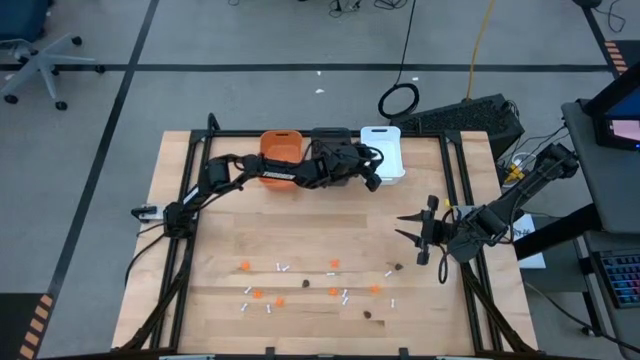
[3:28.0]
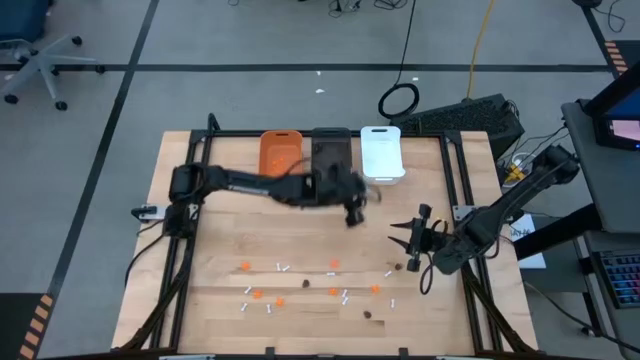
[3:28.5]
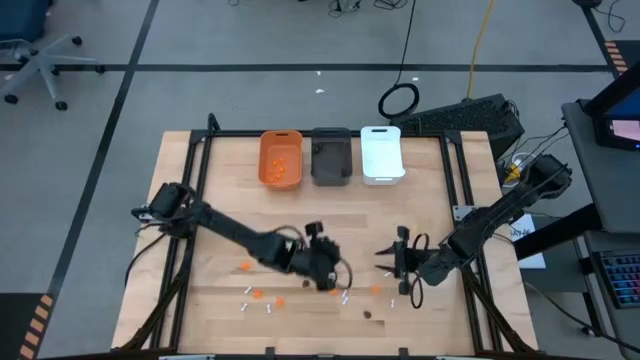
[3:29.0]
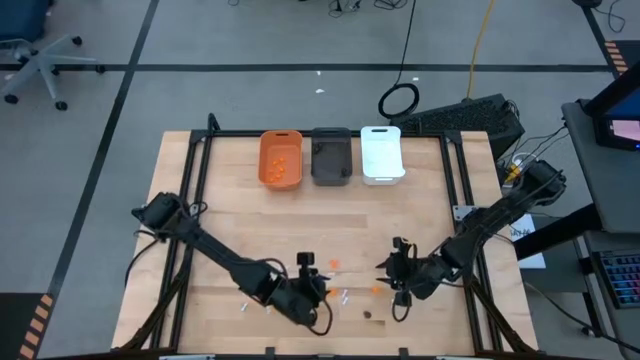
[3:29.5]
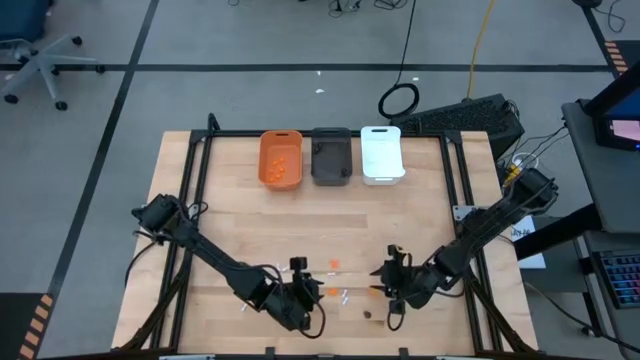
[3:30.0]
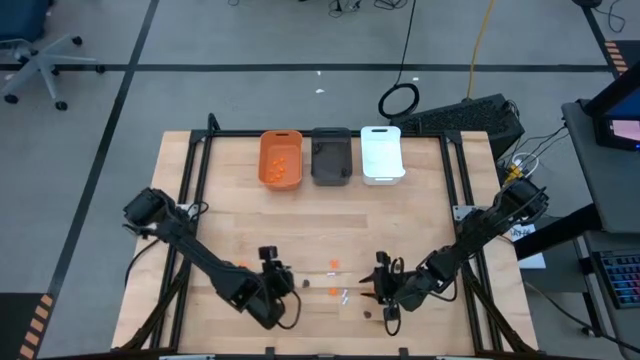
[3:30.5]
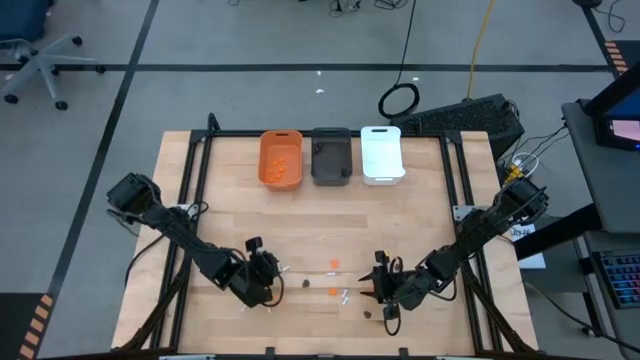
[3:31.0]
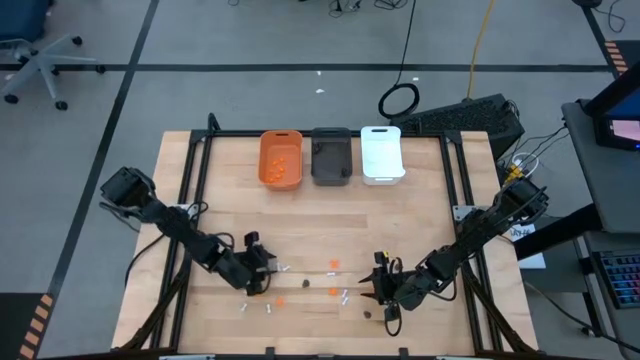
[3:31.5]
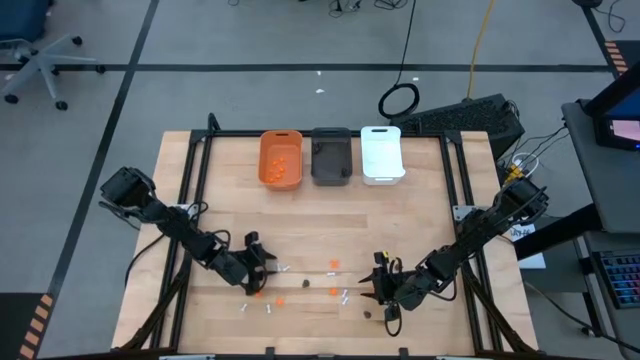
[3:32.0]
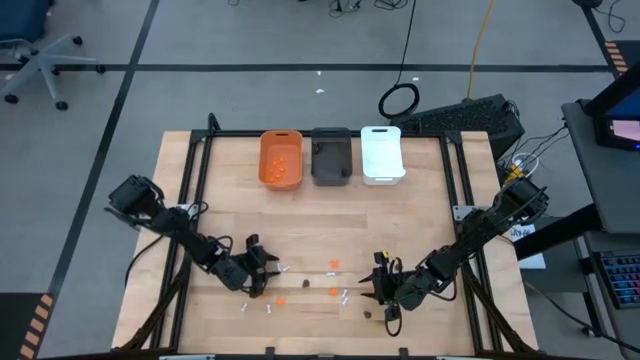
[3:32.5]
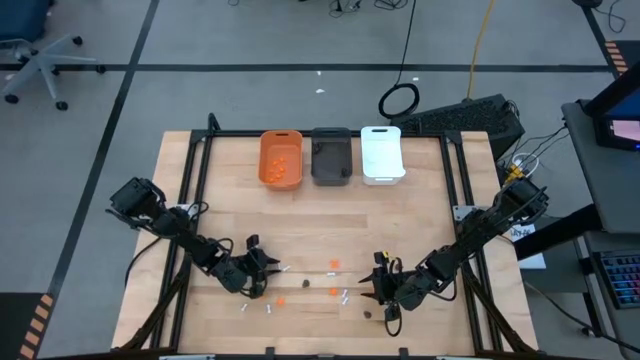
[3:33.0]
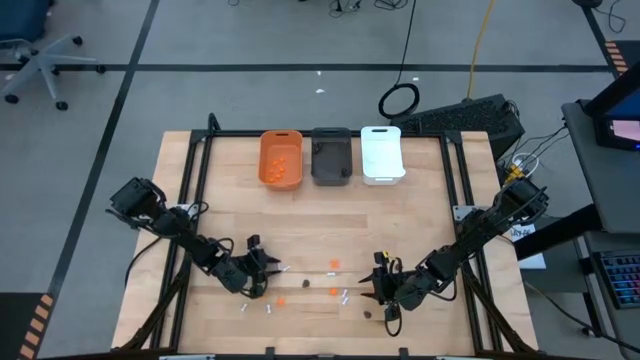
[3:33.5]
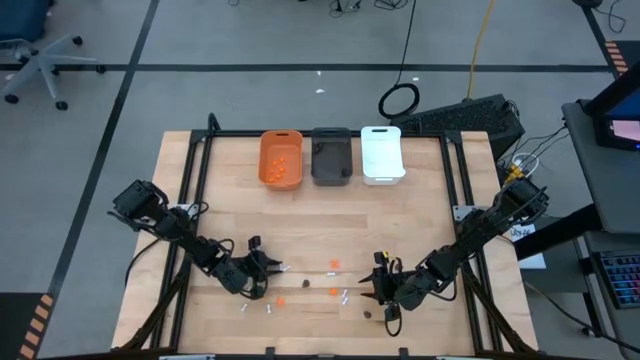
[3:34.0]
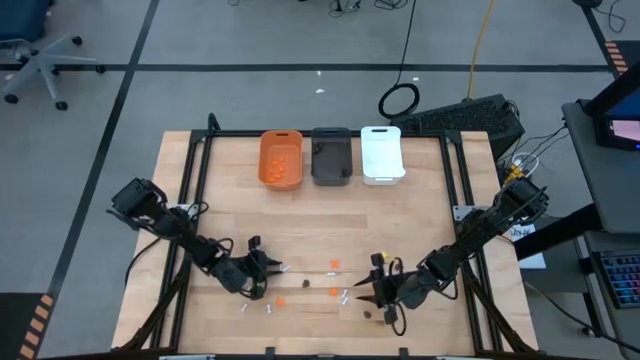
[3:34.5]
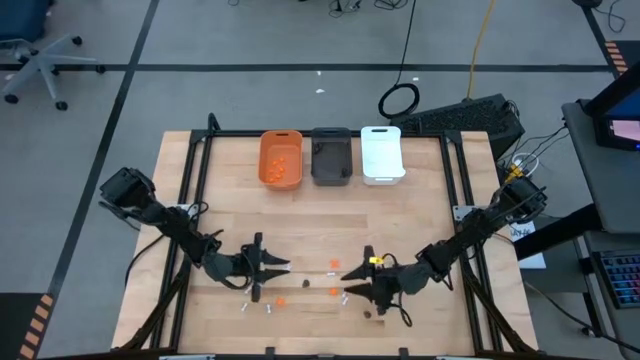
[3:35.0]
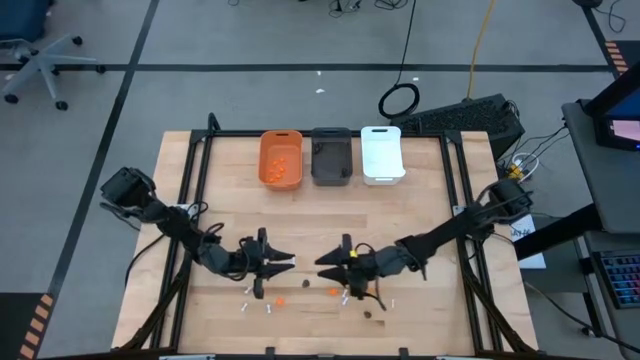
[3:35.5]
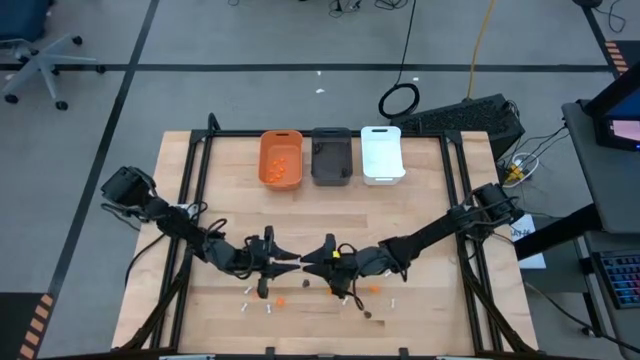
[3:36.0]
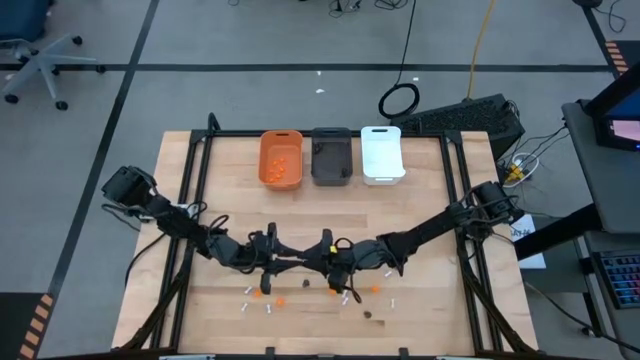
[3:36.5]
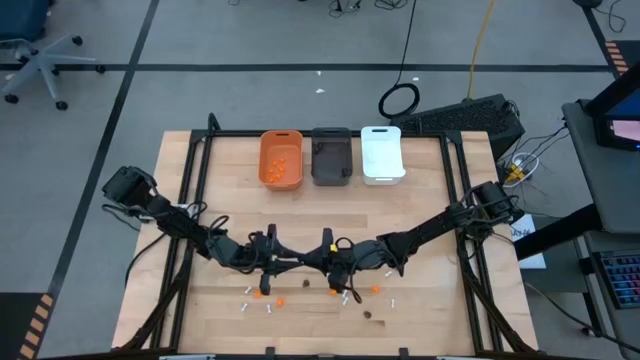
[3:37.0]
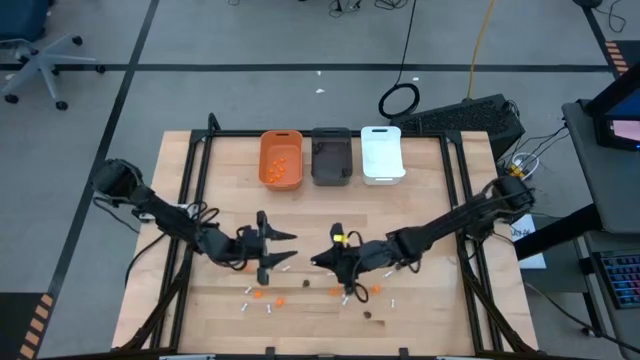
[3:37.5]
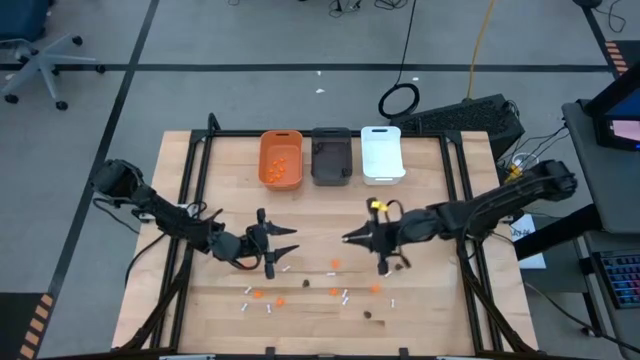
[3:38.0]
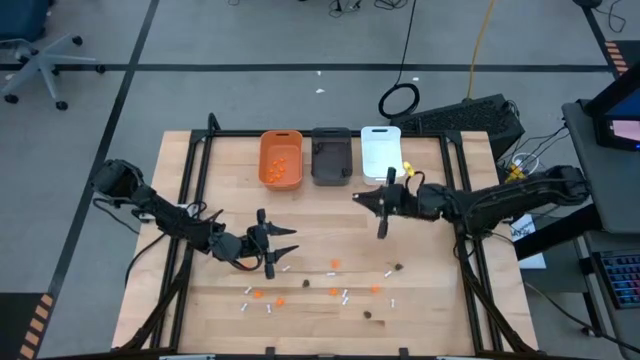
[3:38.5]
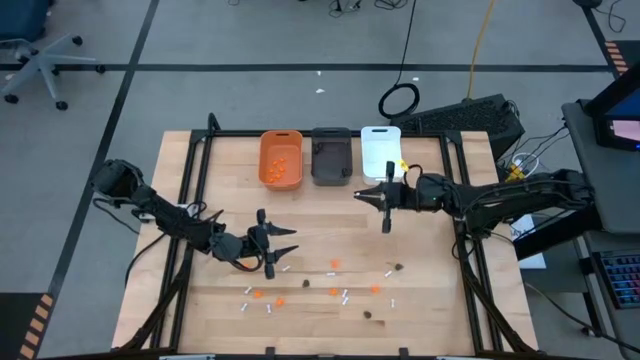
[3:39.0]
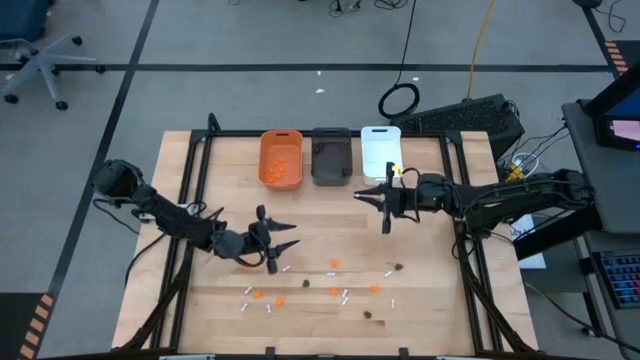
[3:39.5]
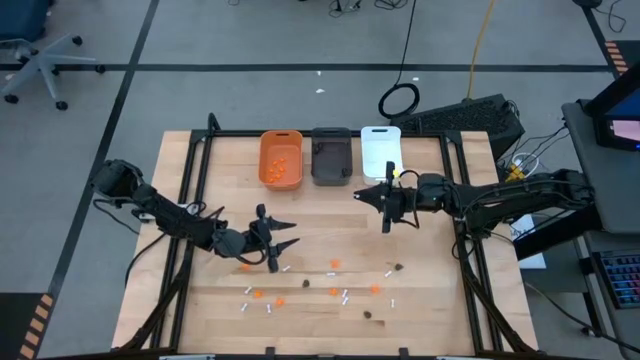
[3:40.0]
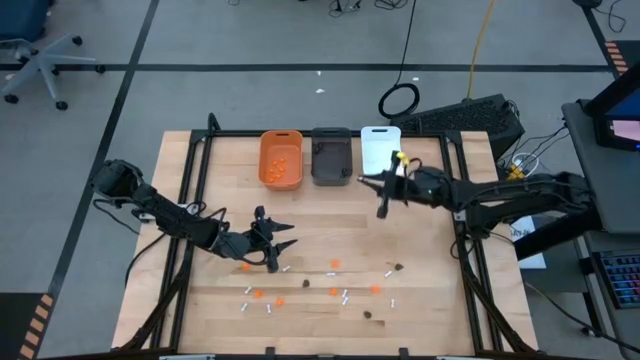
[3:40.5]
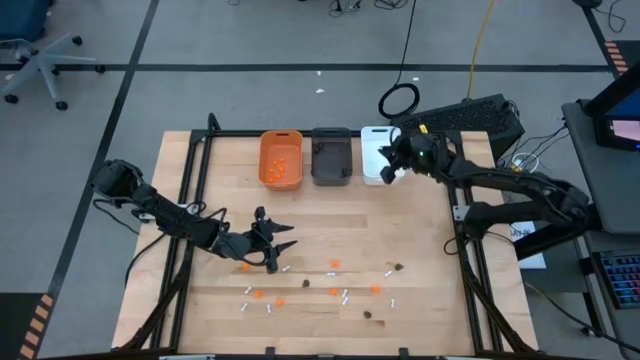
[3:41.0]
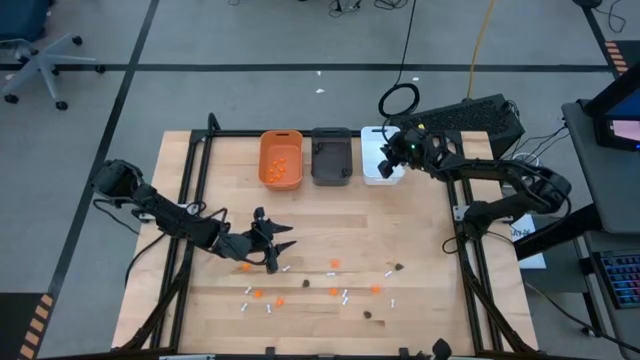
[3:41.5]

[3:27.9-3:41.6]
Task: Sort Halloween decoration
Put the white bone toy into the white bin

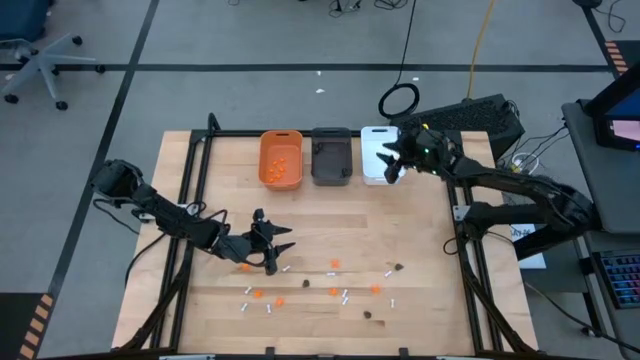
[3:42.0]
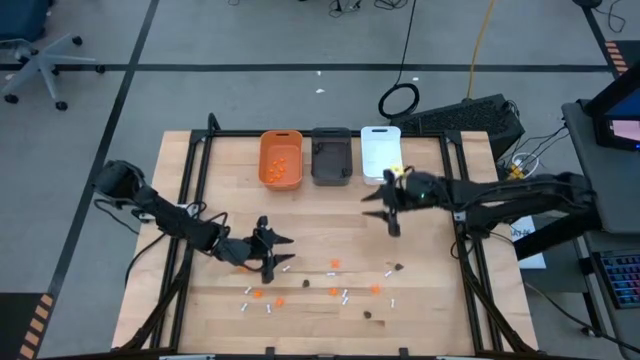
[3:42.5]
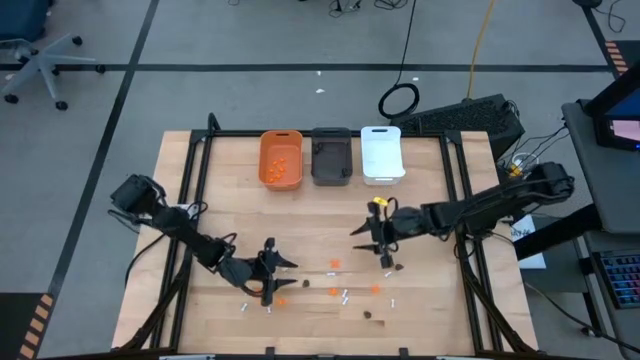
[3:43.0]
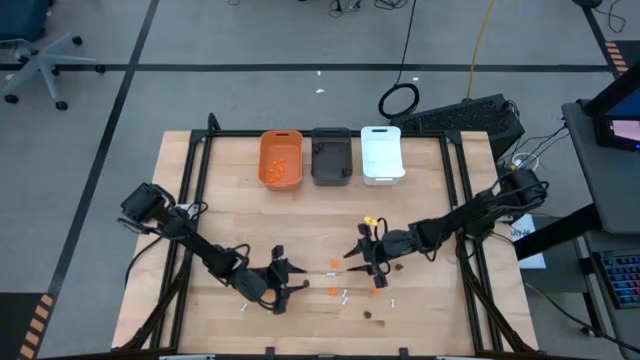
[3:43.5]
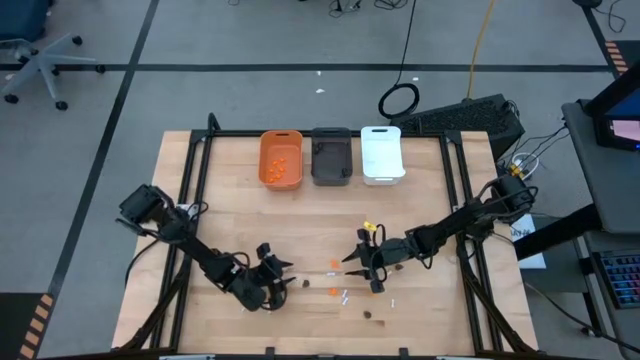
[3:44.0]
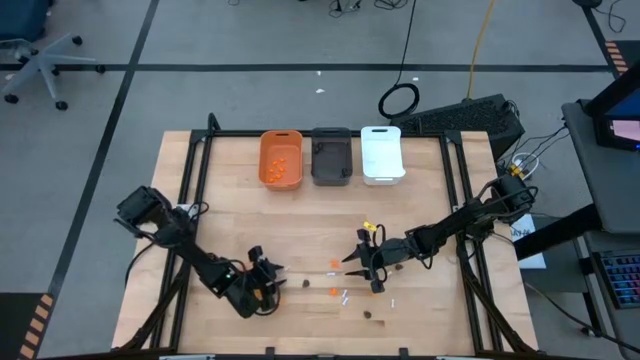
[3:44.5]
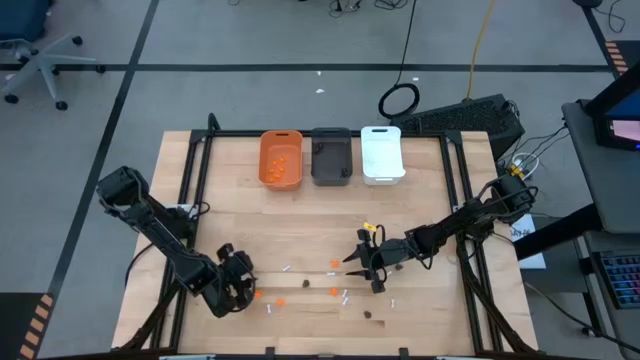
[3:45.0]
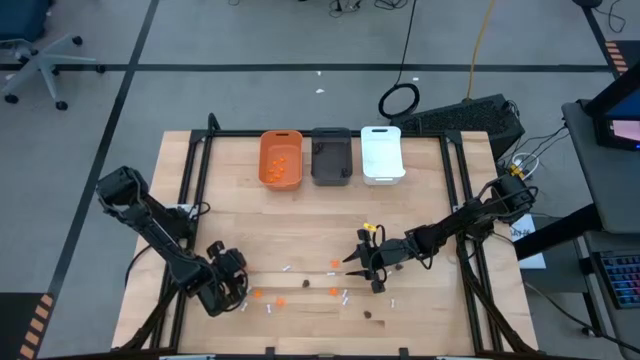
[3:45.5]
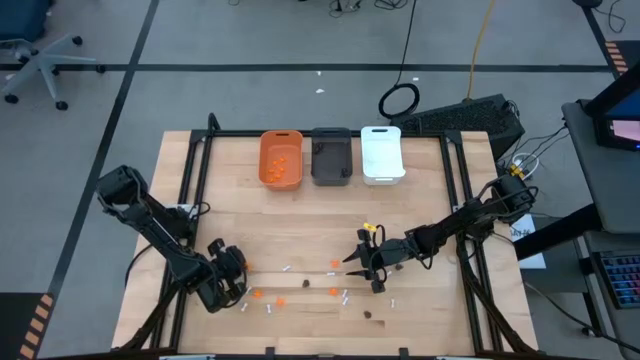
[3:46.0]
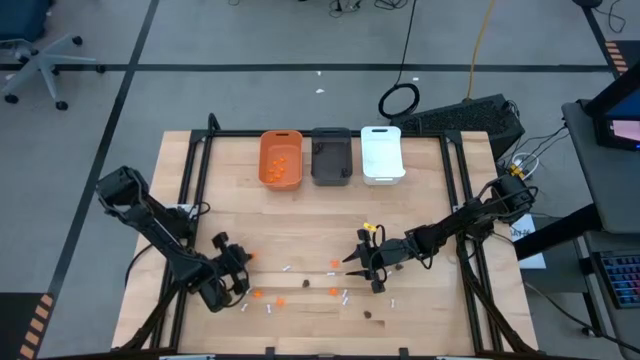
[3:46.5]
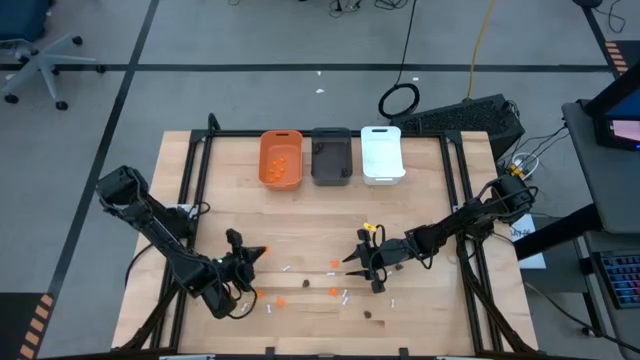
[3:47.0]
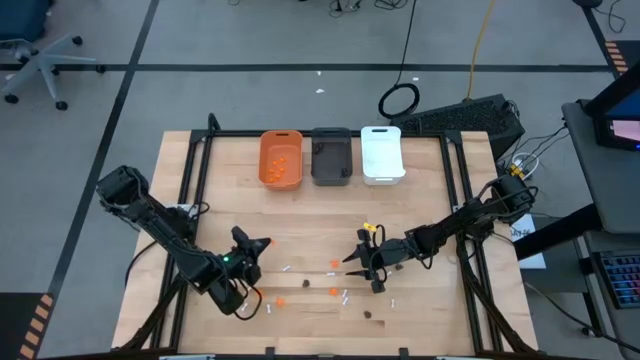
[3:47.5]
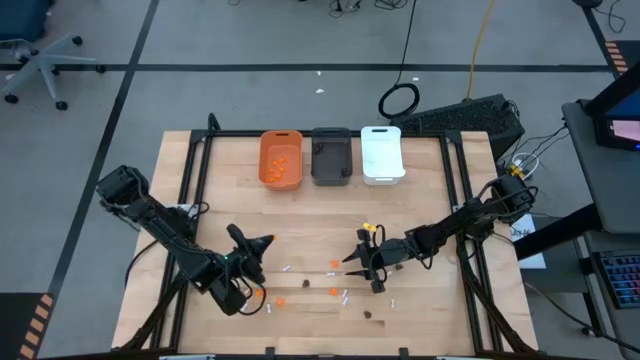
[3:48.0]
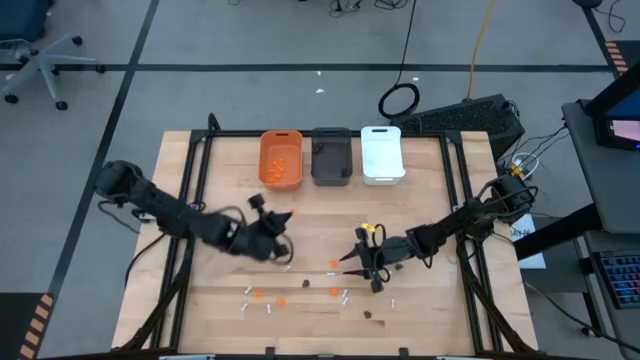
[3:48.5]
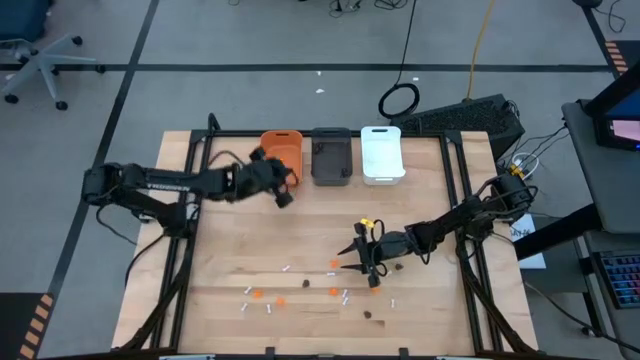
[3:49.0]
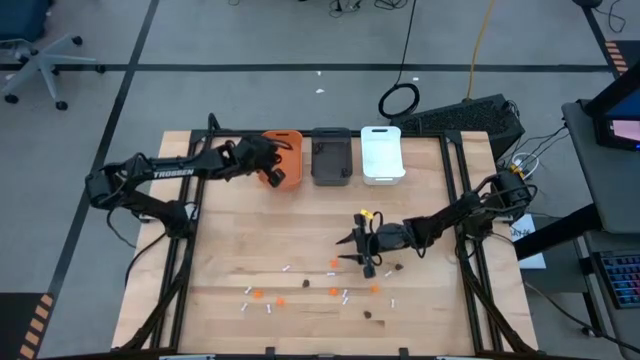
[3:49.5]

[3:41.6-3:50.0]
Put the orange spider toy into the orange bin
